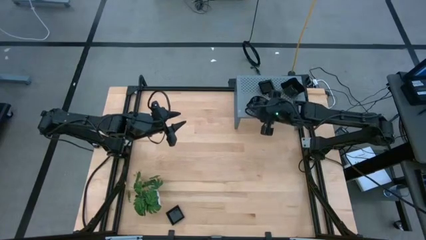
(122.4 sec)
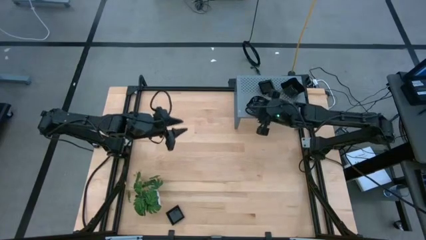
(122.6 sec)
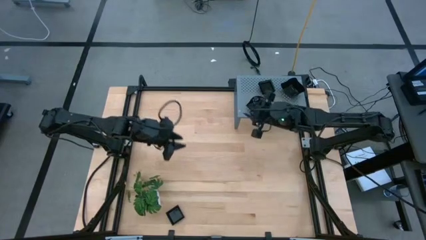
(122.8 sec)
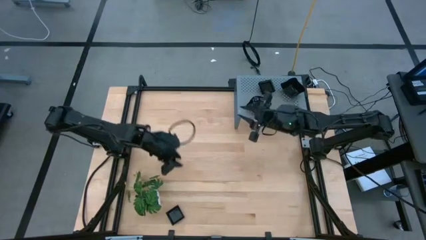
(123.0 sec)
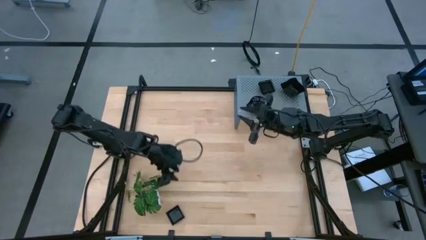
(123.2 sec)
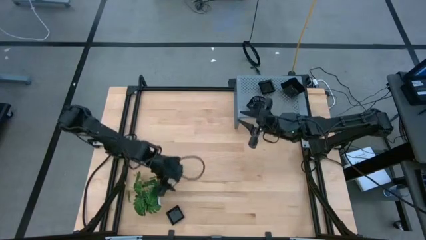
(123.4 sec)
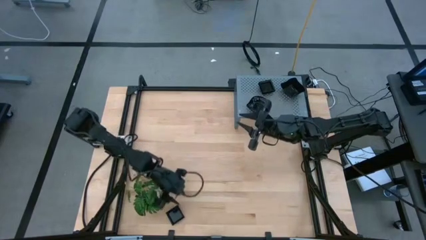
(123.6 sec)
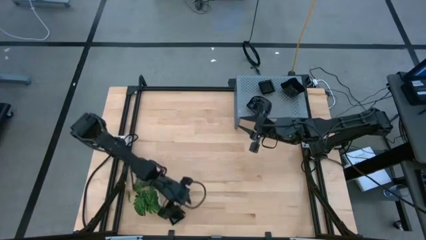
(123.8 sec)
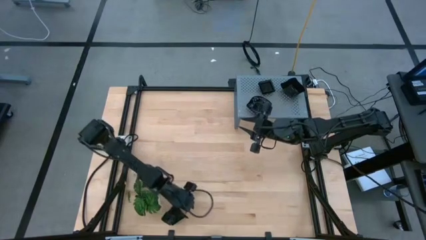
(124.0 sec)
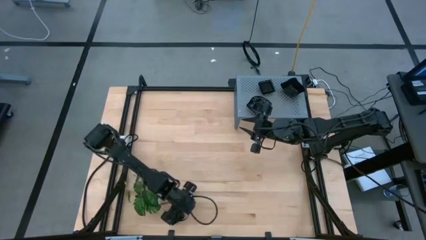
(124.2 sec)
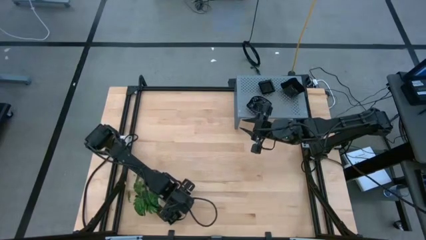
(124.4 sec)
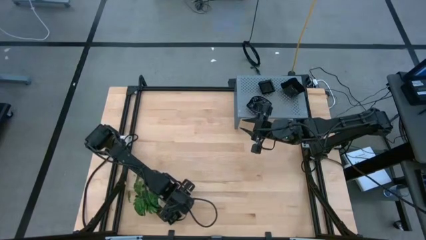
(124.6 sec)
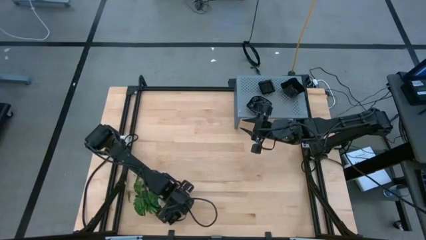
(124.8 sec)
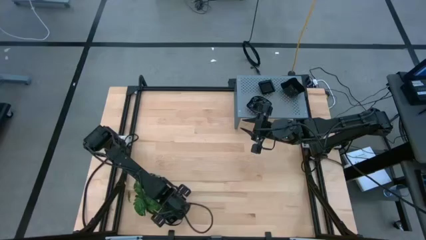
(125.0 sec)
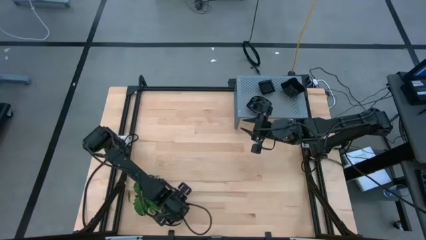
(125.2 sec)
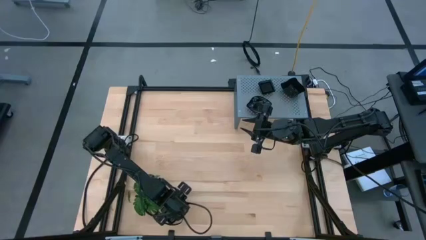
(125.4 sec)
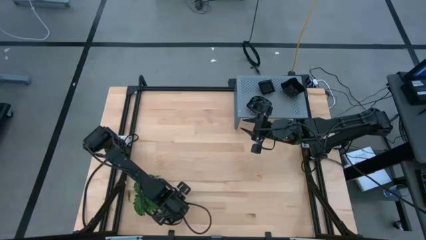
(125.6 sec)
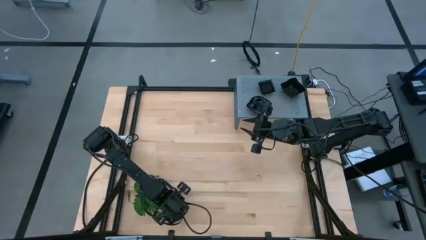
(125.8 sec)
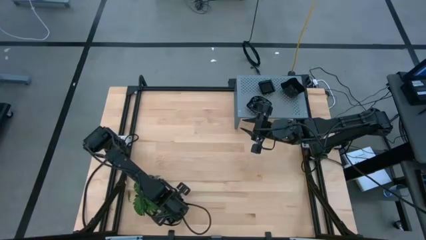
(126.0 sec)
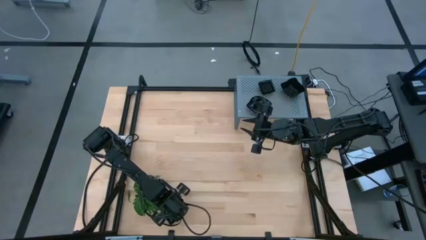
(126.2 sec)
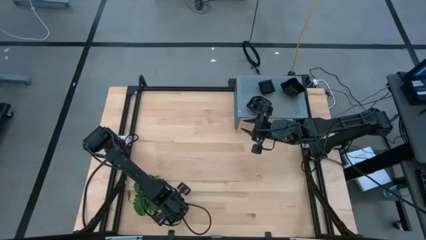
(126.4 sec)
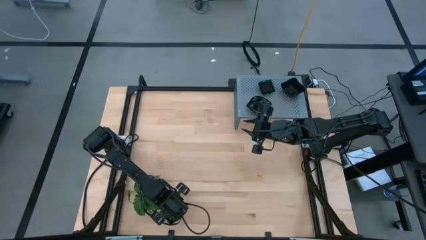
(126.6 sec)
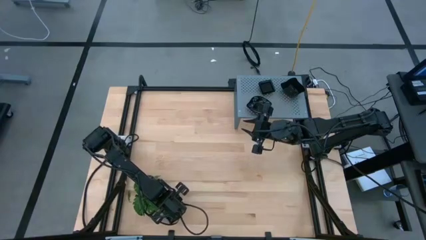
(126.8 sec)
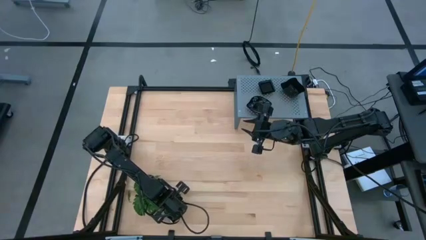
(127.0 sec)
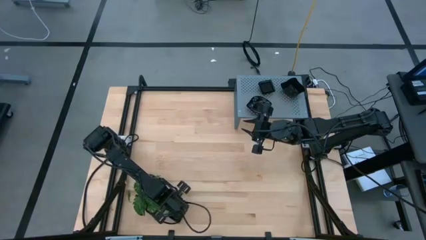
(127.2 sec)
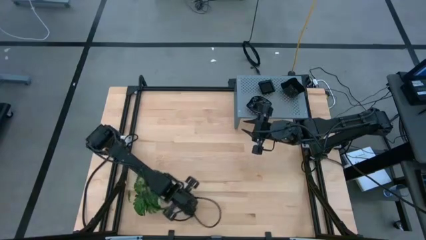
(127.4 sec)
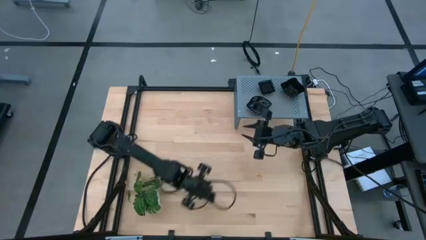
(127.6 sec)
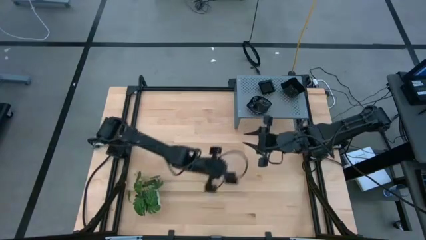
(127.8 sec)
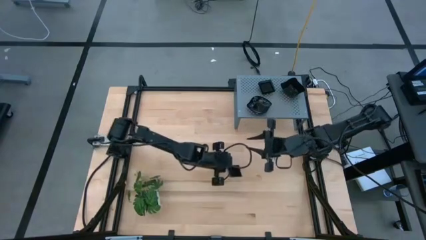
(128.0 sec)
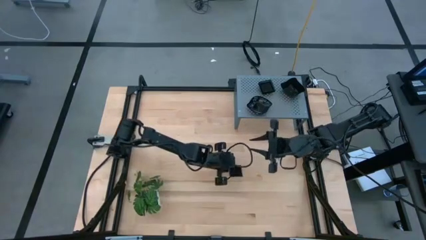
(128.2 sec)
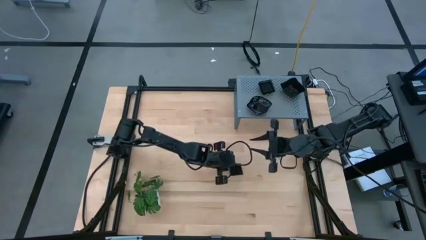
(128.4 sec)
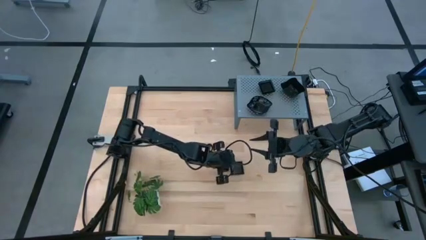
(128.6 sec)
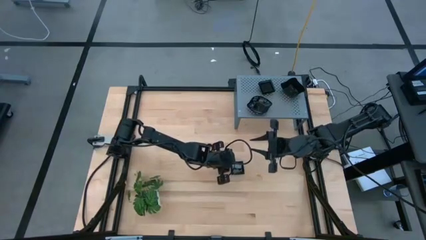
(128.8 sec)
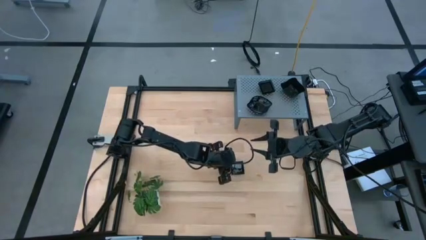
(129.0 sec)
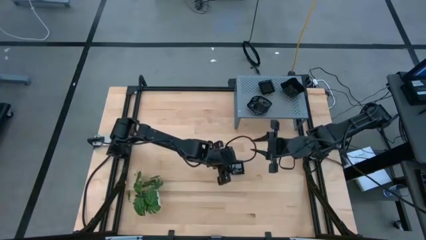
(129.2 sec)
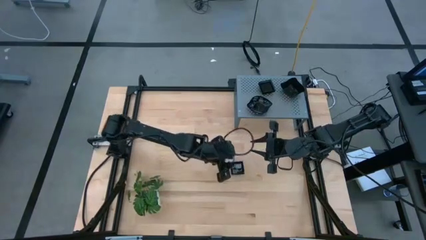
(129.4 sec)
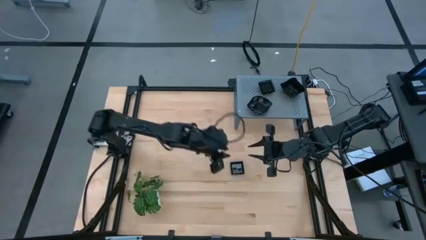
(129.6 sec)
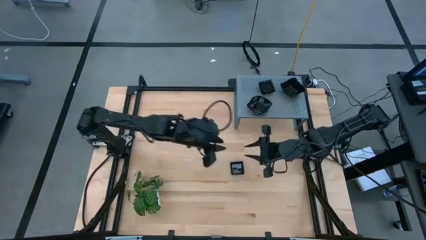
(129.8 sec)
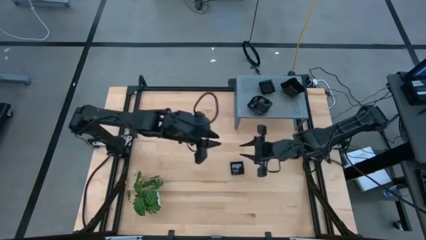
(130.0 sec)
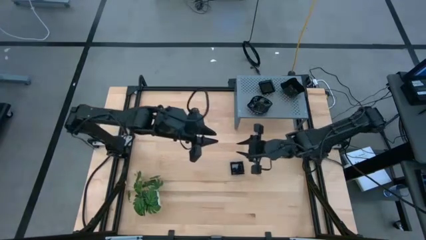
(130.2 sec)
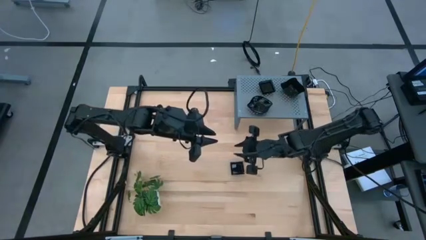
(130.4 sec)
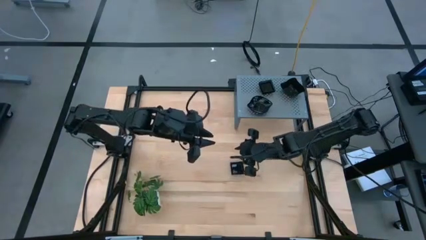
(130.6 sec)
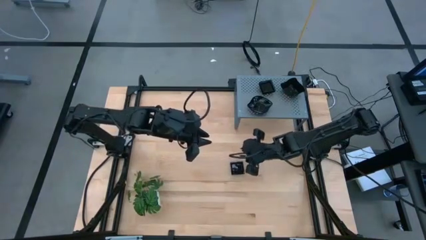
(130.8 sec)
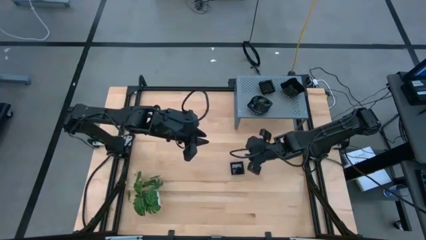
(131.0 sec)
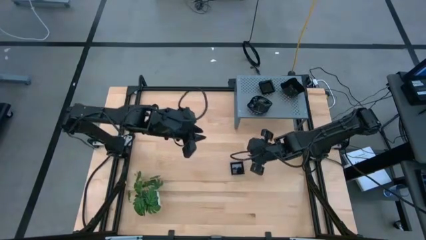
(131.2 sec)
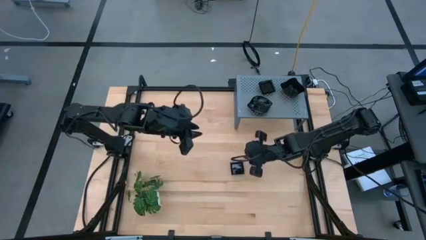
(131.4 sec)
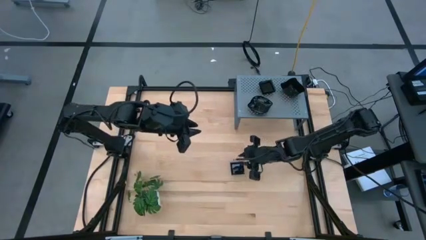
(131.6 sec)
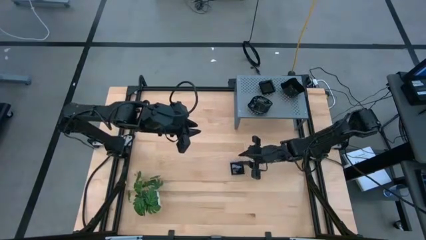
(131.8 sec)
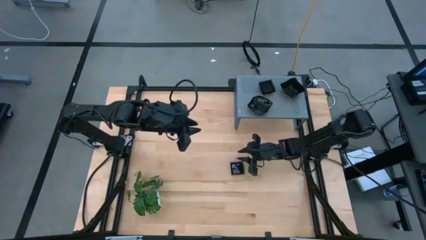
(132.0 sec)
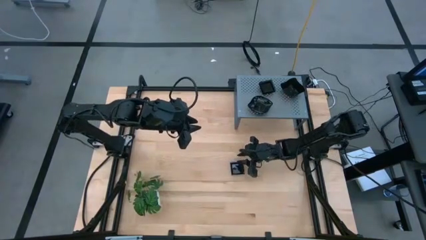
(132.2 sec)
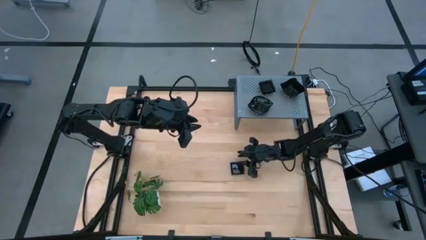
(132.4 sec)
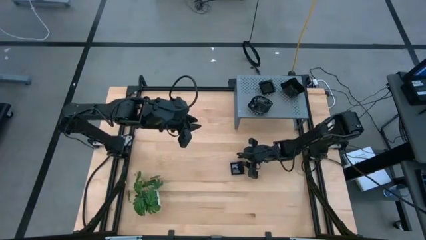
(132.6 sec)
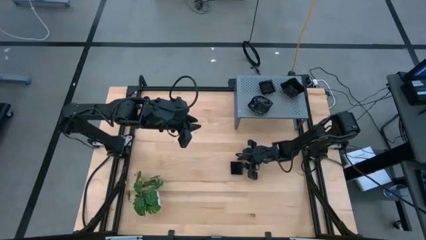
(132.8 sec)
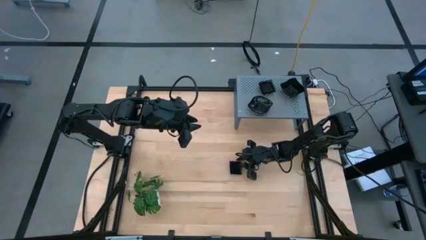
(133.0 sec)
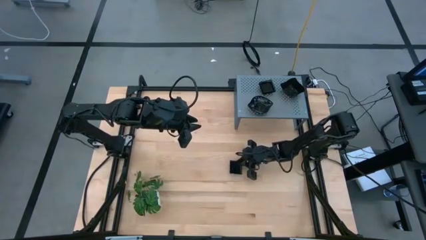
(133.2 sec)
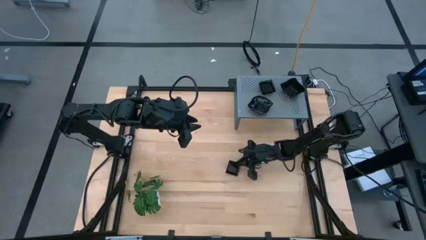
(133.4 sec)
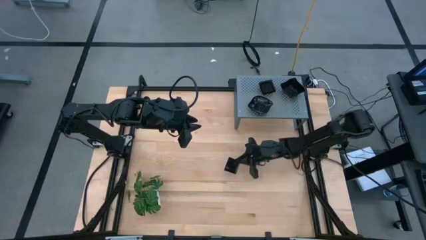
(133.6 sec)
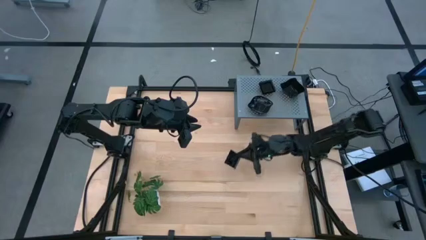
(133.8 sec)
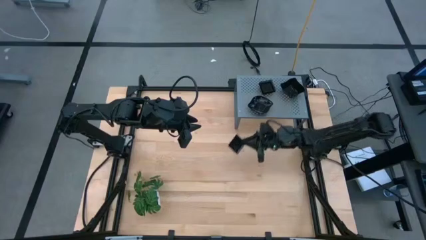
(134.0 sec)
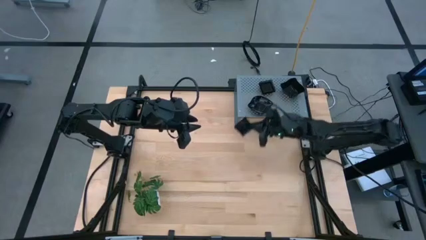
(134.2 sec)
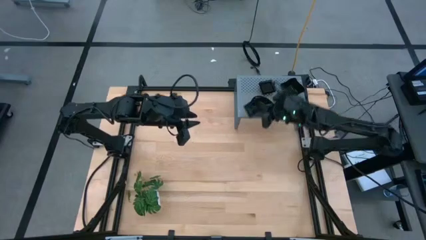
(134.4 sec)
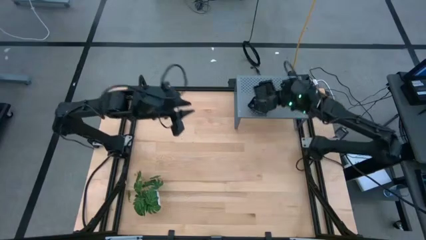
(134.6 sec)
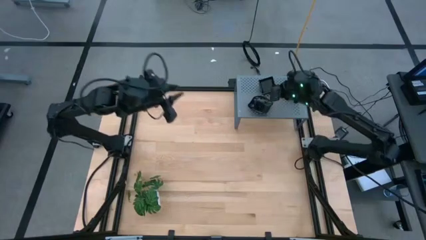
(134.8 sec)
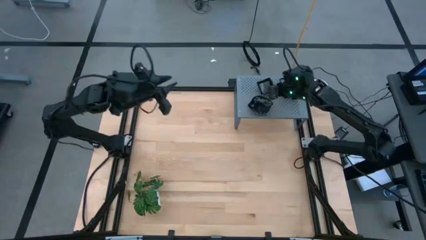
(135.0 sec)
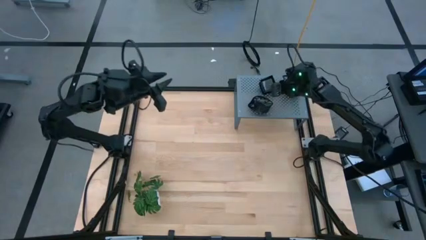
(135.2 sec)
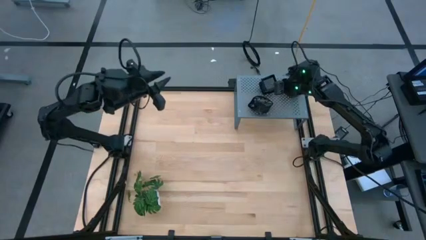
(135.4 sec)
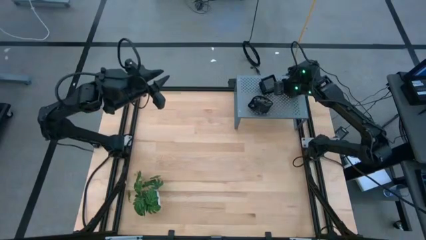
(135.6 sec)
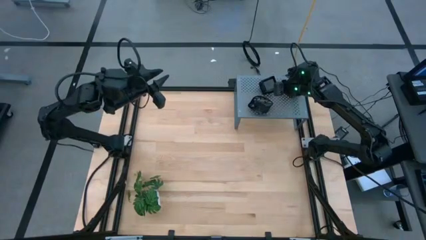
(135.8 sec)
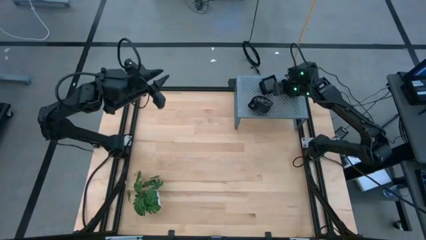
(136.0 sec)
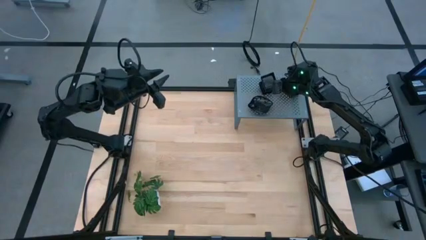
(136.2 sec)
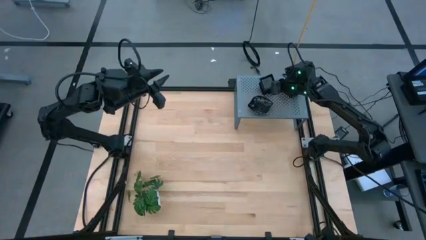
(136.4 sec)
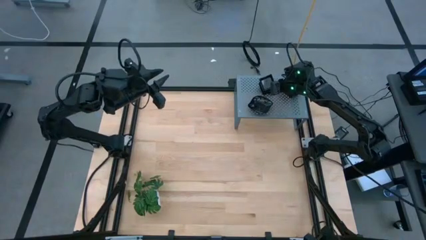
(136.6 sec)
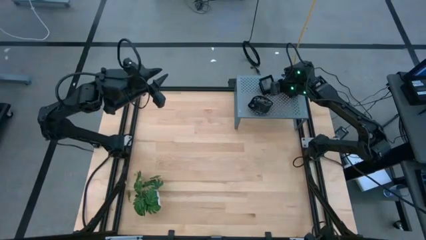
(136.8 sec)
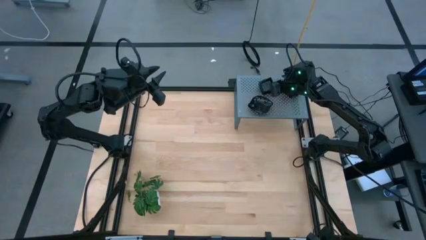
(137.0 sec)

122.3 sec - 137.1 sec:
Task: Pick & Place Mini shaped plates
Stack the square plate on top of the other square plates
